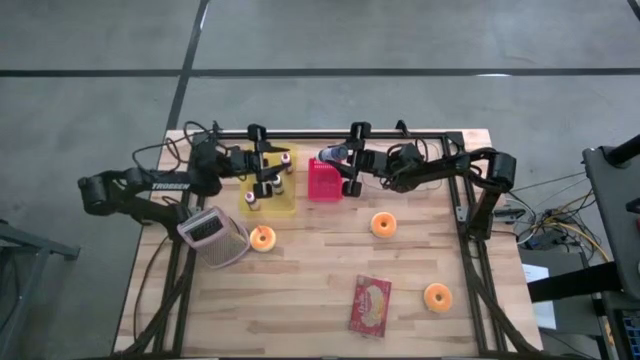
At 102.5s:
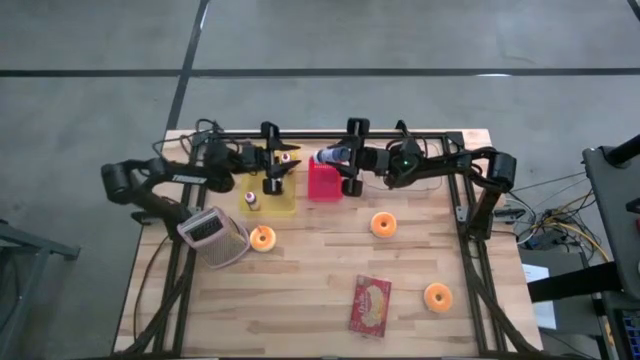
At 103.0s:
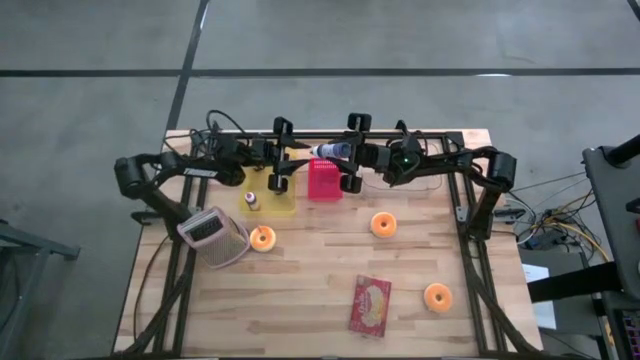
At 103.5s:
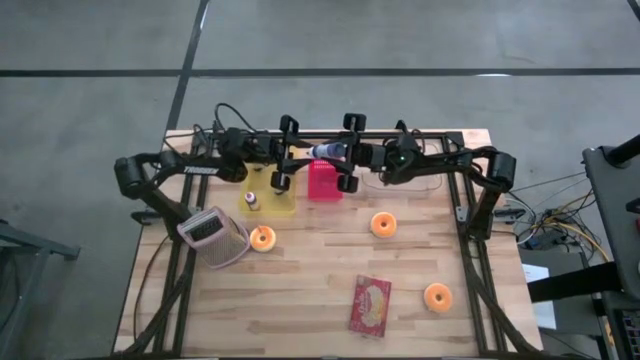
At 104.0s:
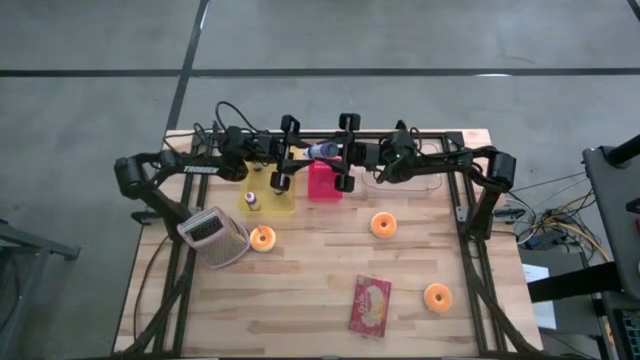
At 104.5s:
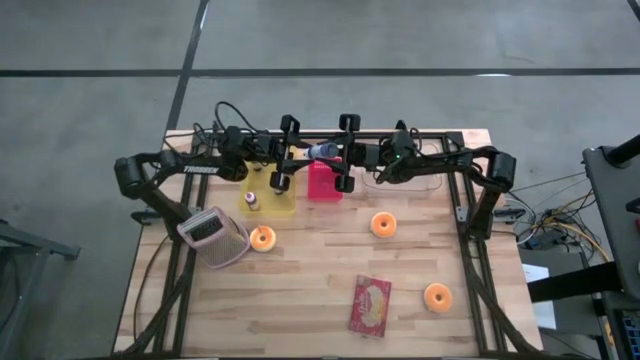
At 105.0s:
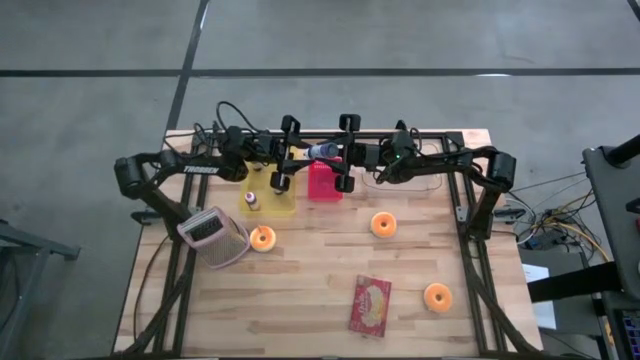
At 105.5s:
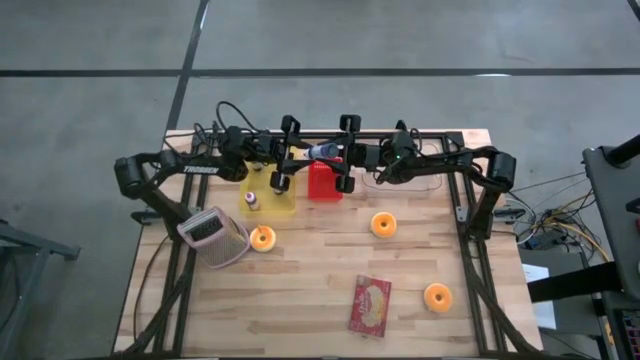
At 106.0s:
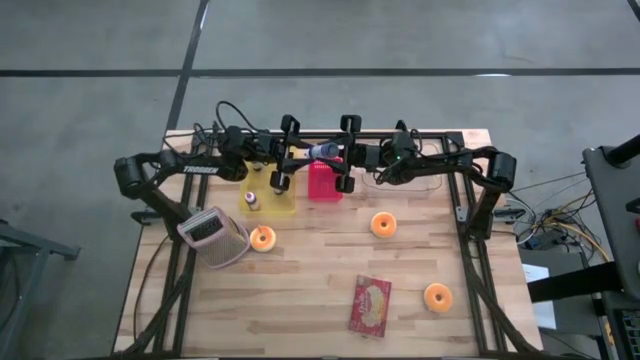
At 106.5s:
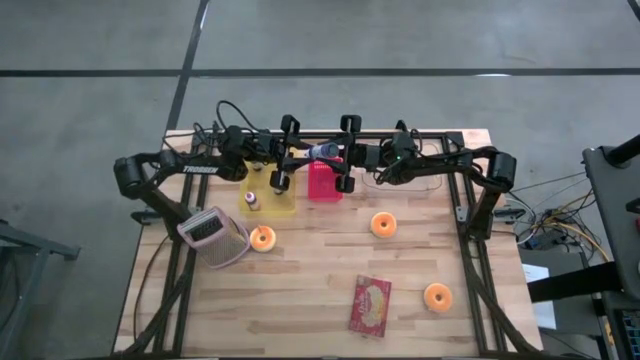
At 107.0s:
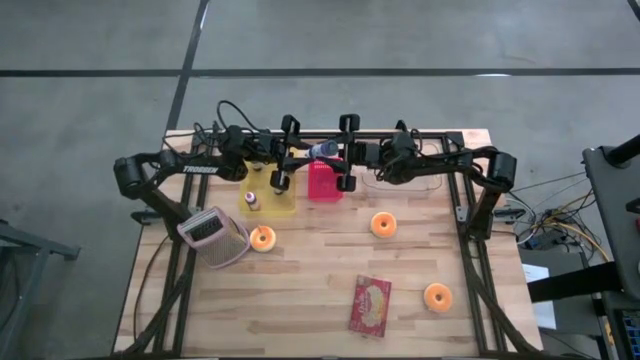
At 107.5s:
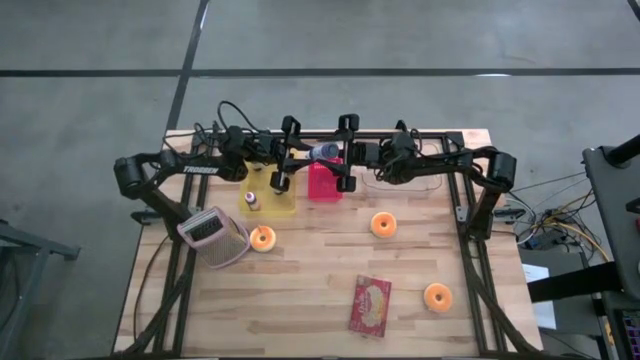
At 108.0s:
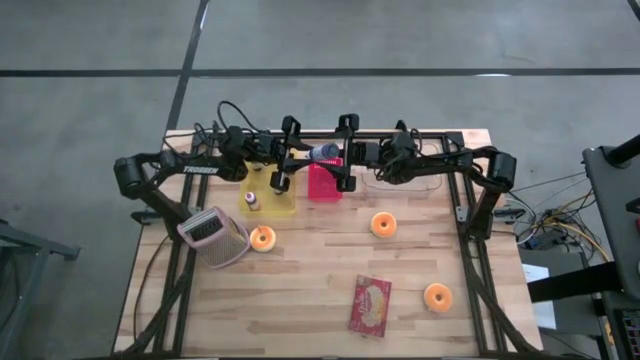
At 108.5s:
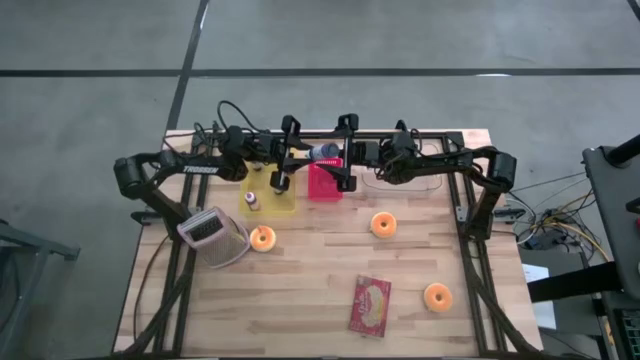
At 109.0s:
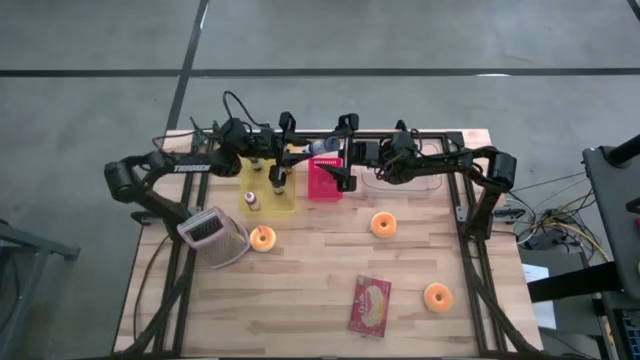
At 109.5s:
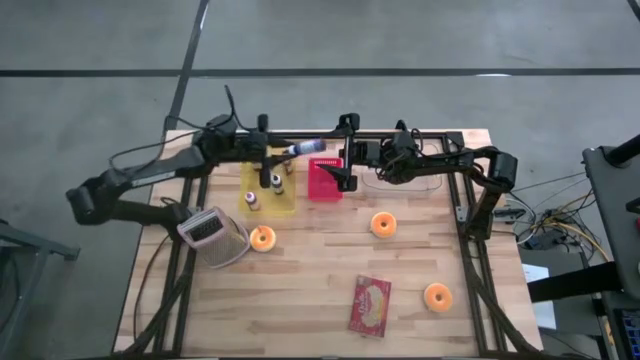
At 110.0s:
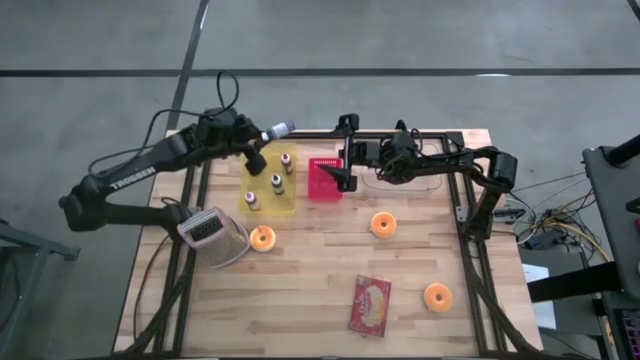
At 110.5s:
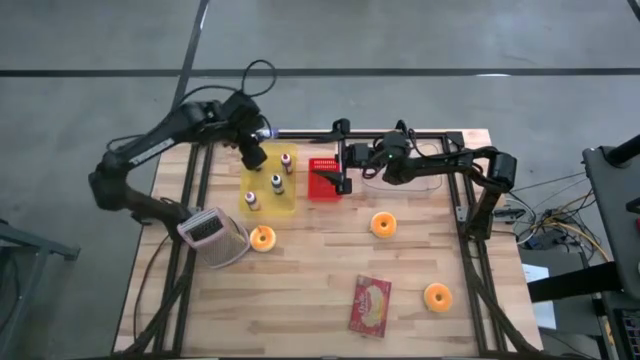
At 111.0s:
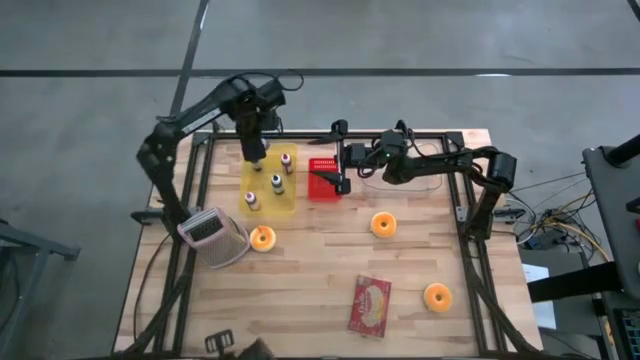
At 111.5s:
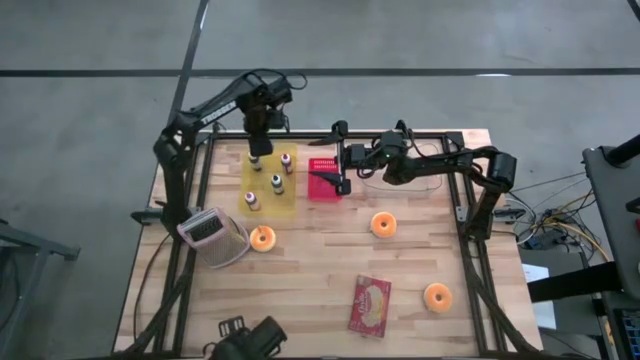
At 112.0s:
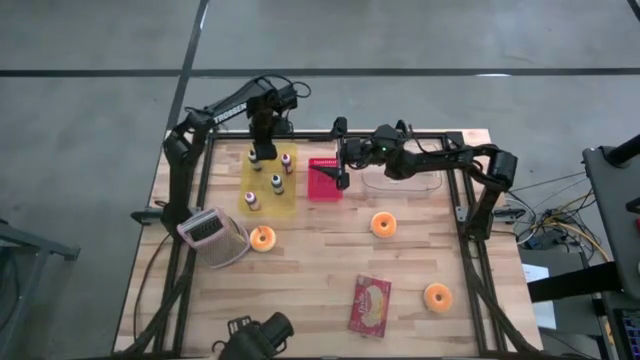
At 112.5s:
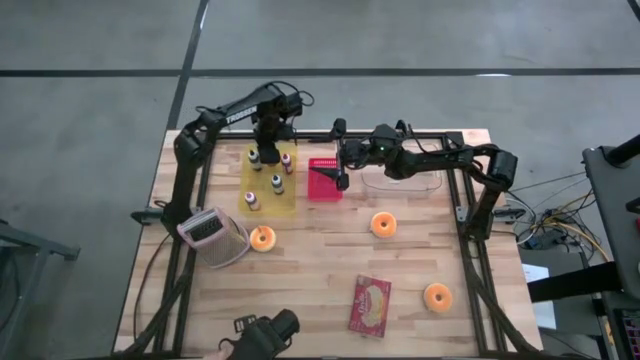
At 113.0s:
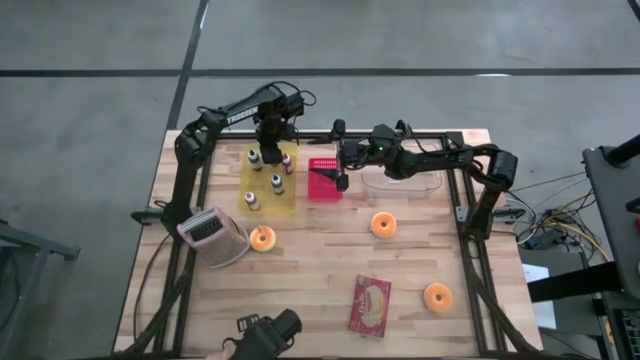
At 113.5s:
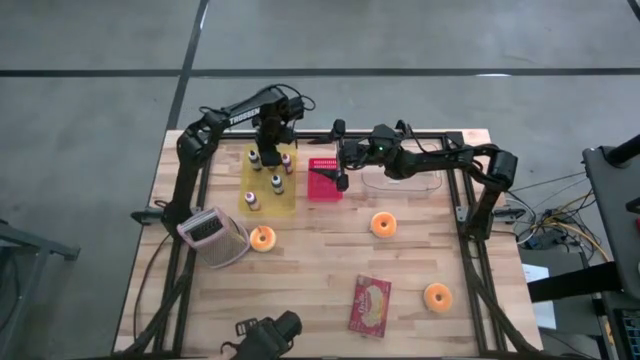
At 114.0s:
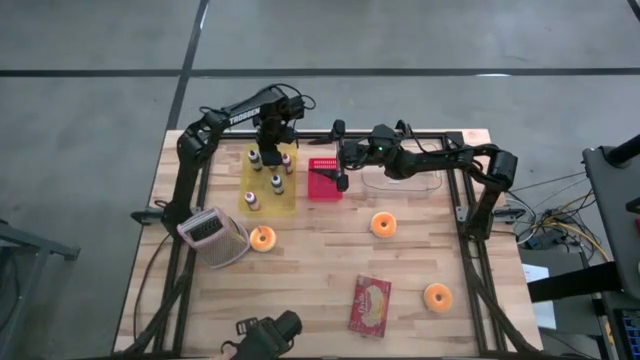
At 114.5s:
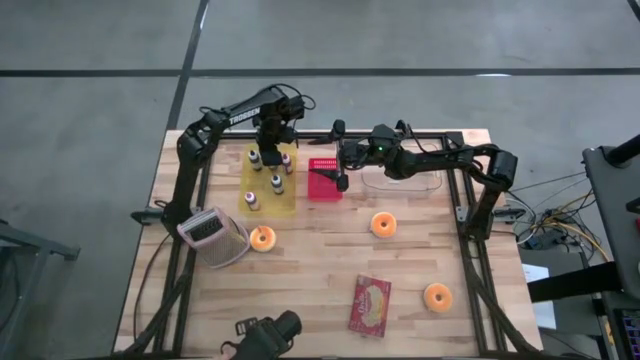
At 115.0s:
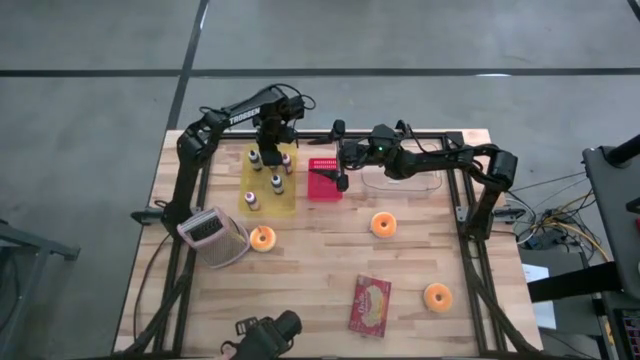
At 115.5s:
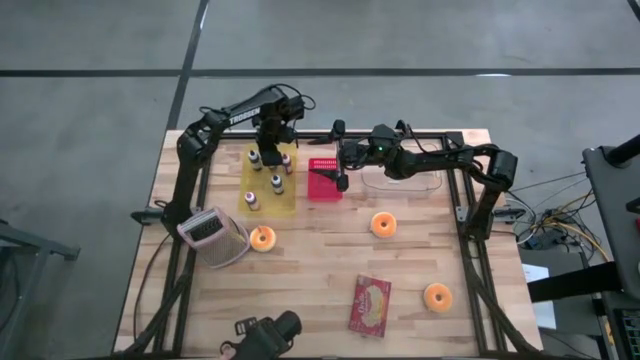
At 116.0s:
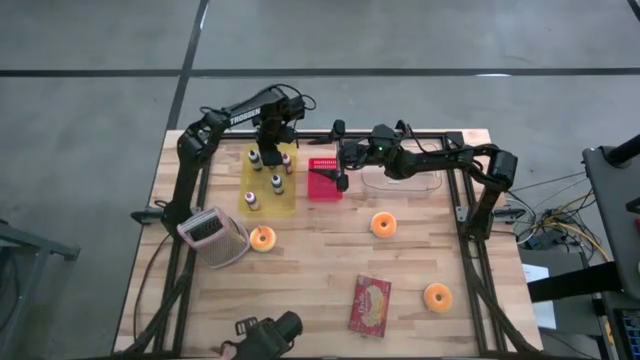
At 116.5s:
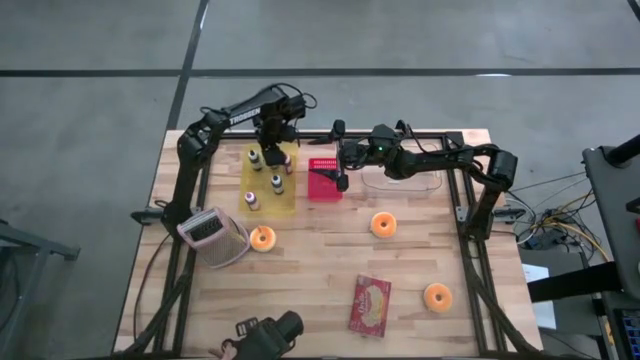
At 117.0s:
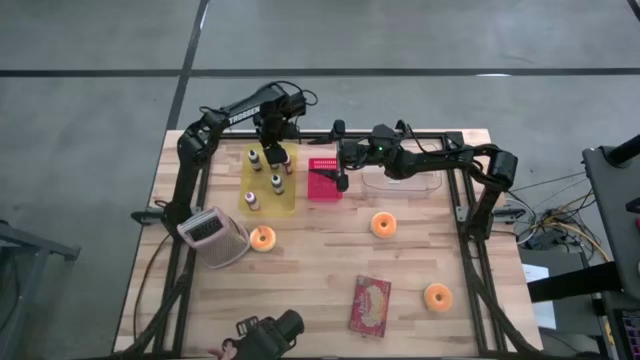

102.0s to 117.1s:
Task: Pick & Place Food Item
Put the purple food coloring bottle into the yellow bin

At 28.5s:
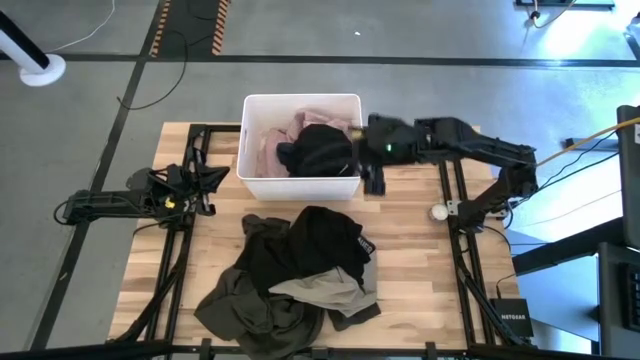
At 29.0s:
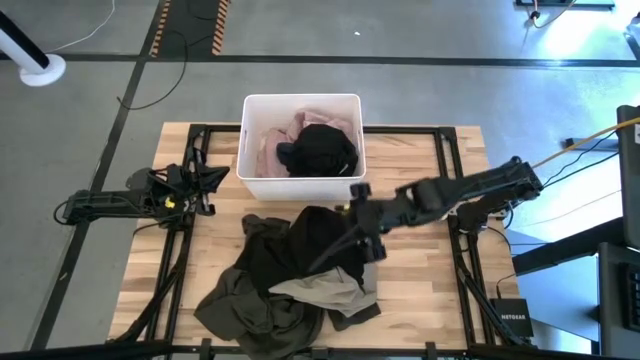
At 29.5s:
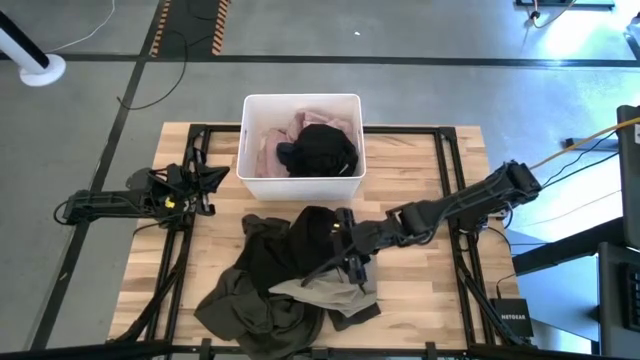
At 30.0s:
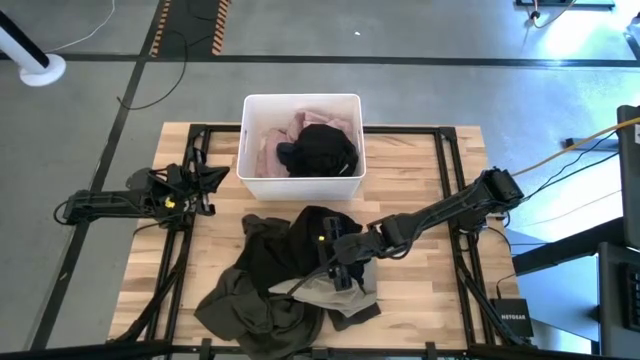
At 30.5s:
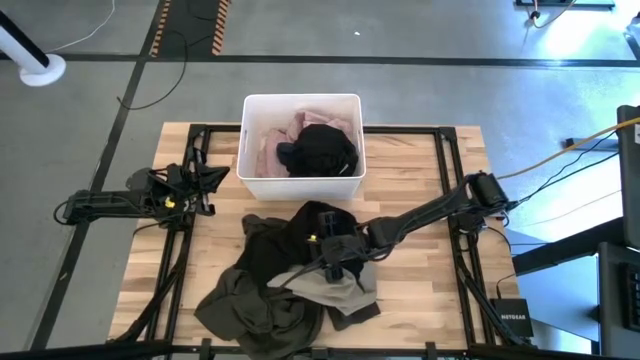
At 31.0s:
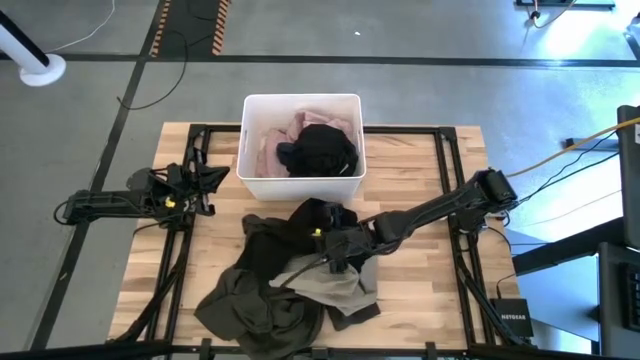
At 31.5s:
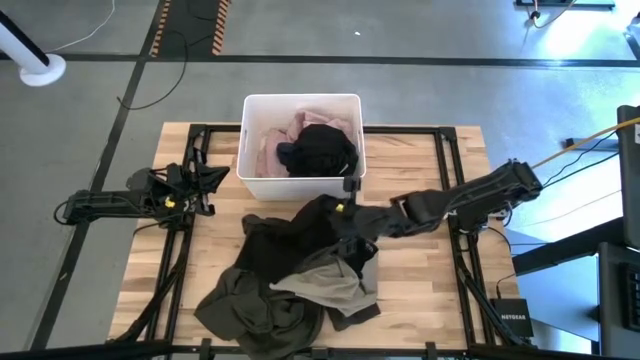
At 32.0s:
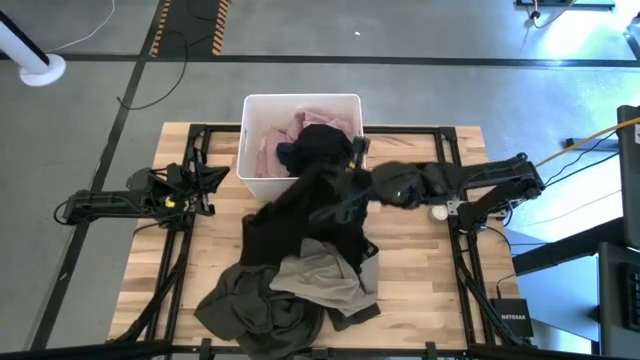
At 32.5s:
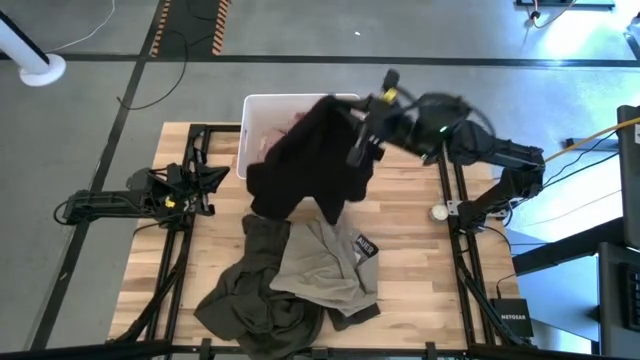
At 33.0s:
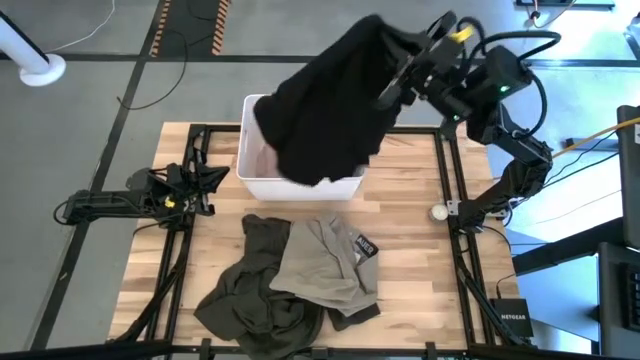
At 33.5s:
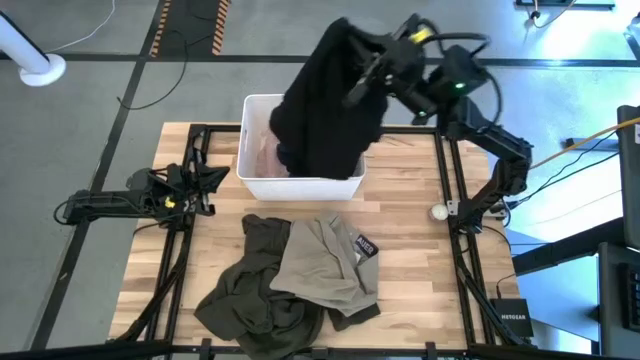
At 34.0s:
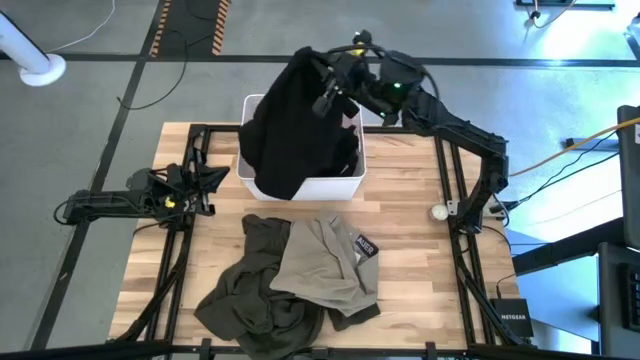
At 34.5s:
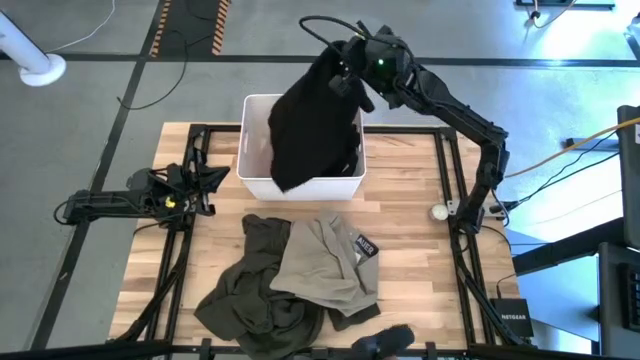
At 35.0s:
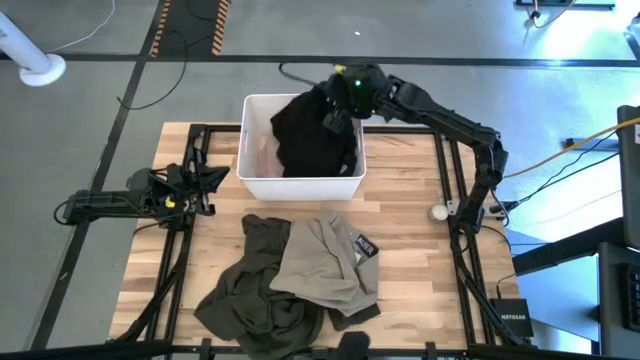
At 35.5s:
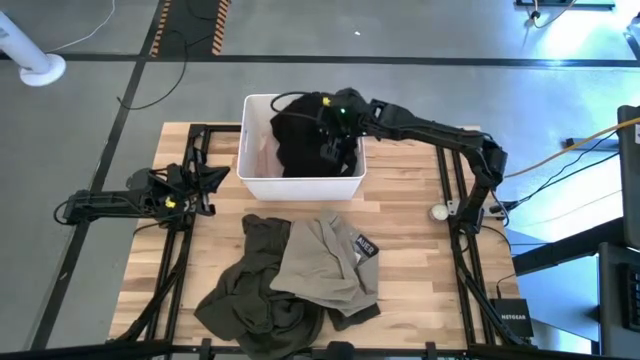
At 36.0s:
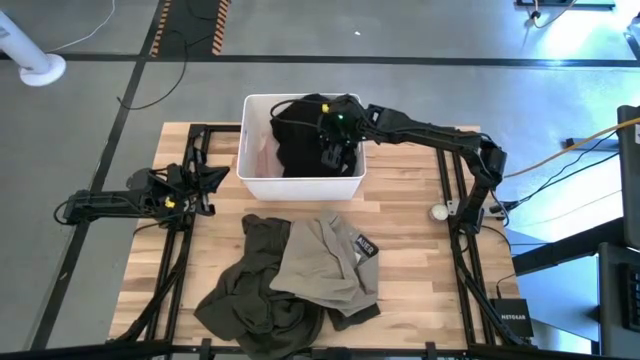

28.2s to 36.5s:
Task: Sort clothes
Put the black shirt into the white laundry organizer
